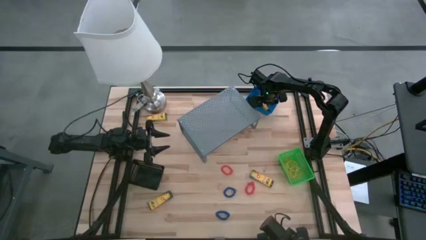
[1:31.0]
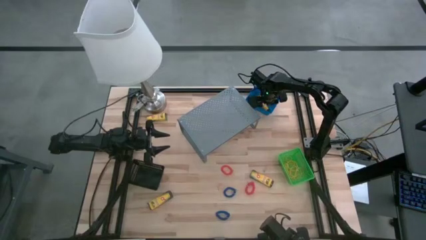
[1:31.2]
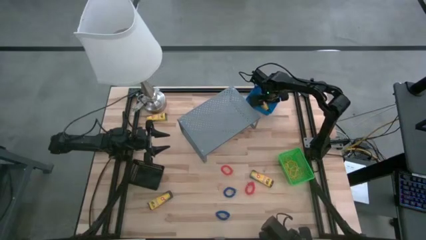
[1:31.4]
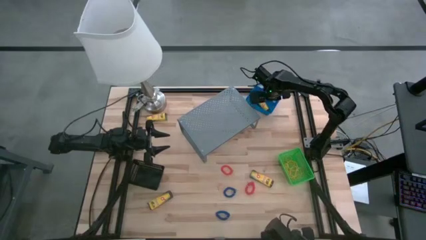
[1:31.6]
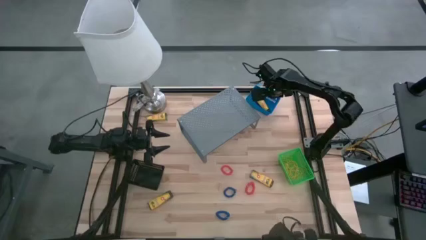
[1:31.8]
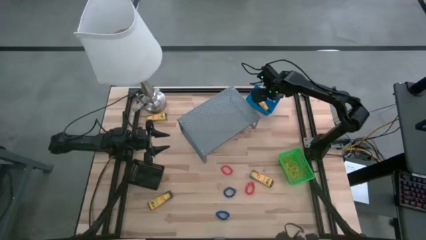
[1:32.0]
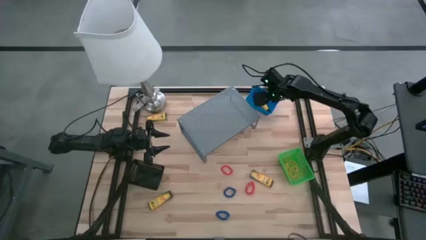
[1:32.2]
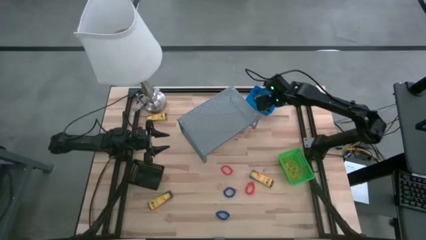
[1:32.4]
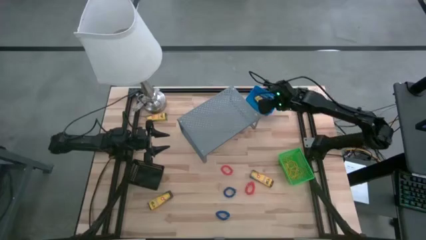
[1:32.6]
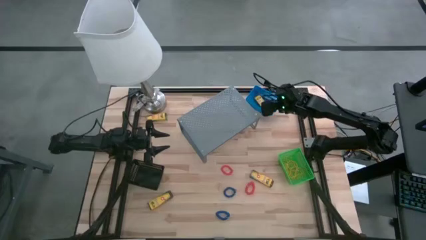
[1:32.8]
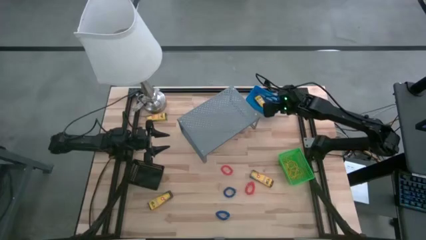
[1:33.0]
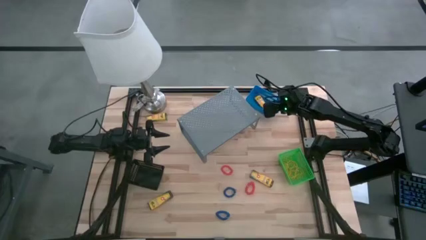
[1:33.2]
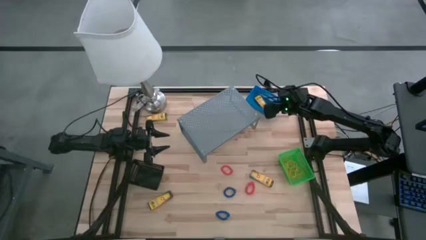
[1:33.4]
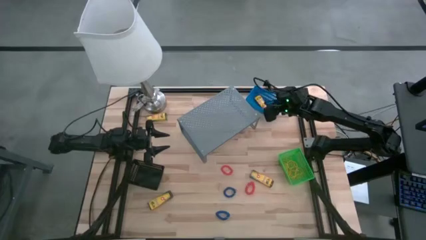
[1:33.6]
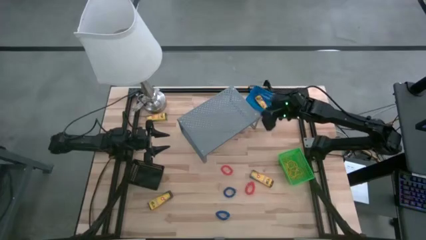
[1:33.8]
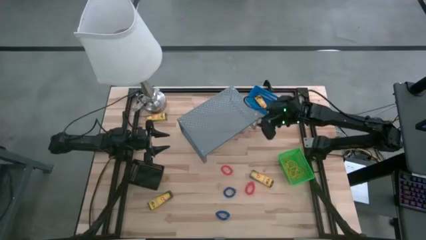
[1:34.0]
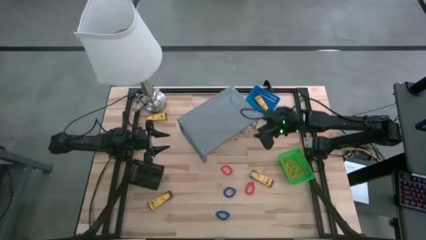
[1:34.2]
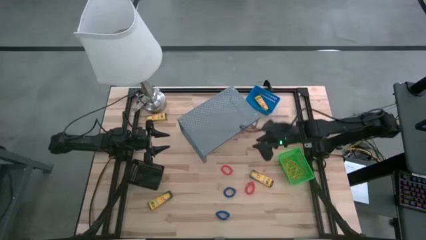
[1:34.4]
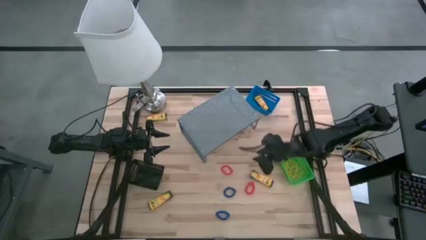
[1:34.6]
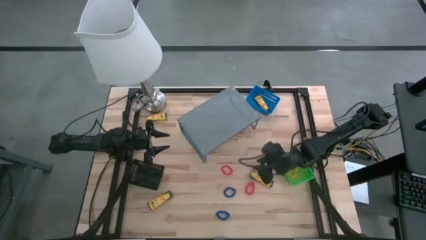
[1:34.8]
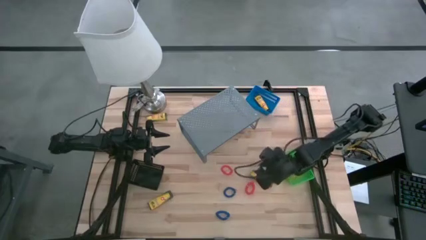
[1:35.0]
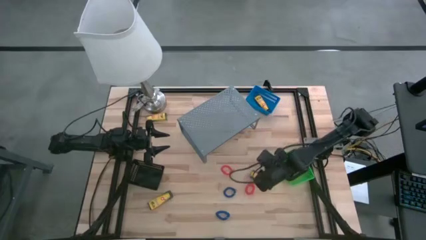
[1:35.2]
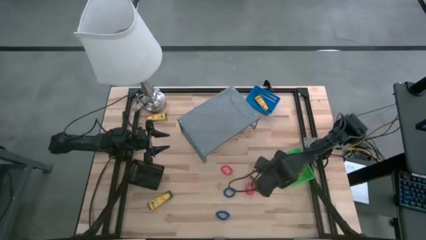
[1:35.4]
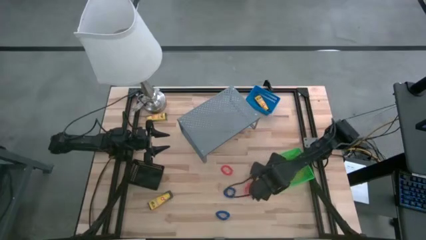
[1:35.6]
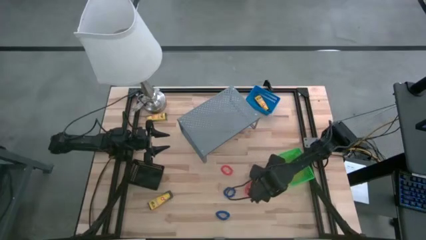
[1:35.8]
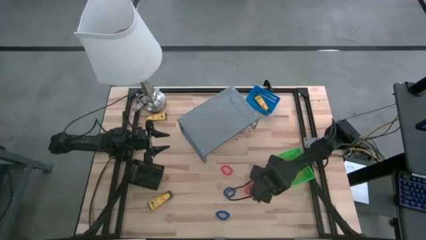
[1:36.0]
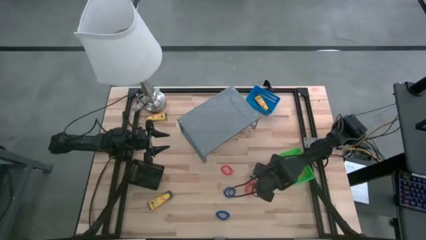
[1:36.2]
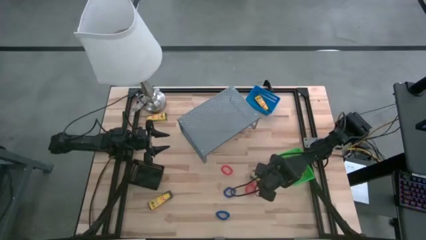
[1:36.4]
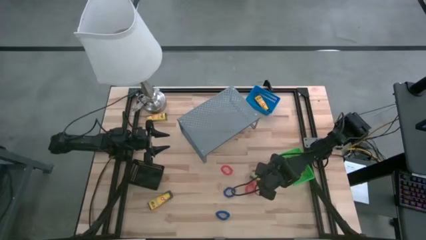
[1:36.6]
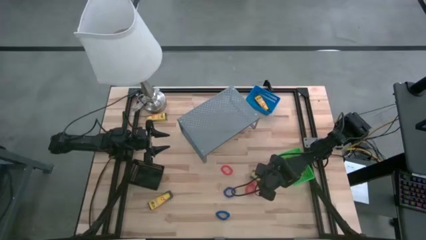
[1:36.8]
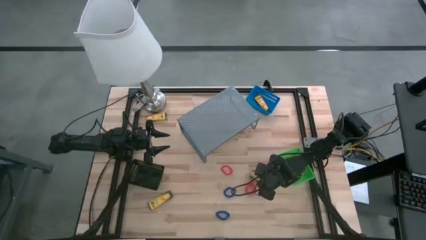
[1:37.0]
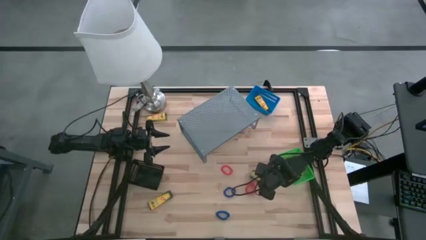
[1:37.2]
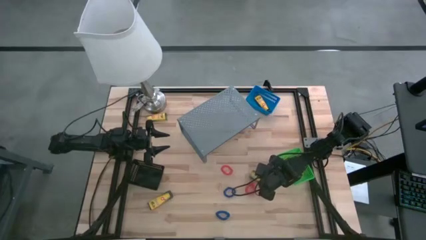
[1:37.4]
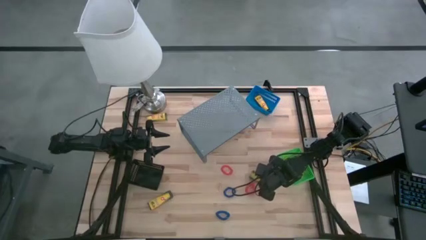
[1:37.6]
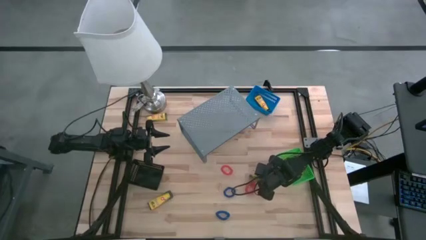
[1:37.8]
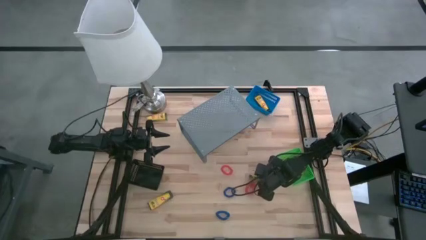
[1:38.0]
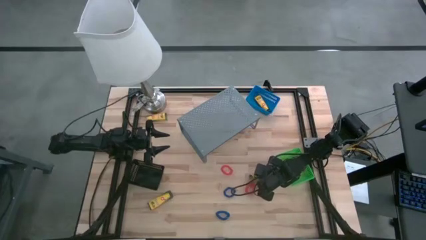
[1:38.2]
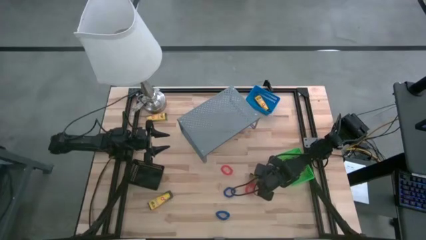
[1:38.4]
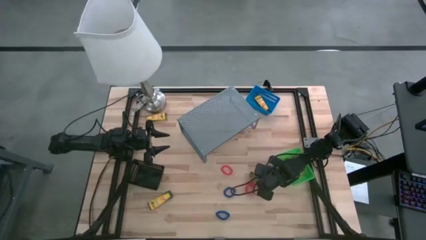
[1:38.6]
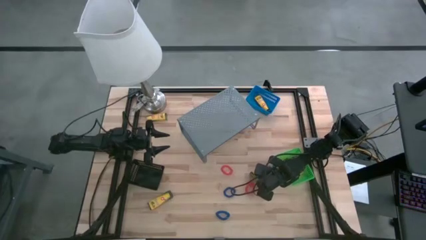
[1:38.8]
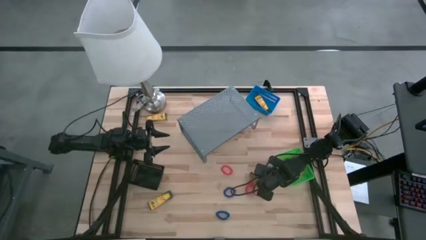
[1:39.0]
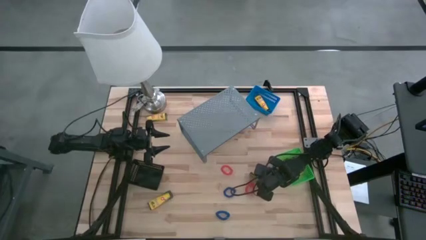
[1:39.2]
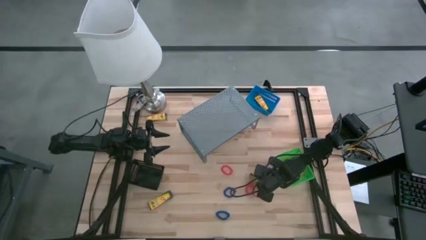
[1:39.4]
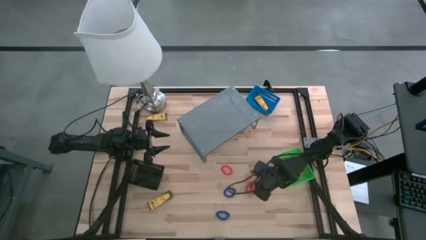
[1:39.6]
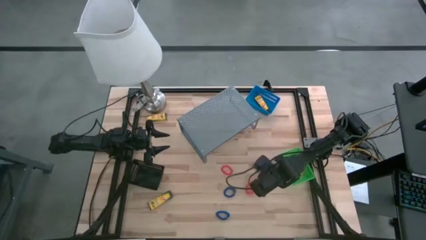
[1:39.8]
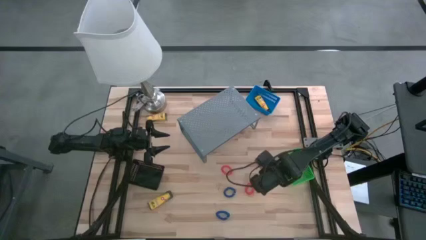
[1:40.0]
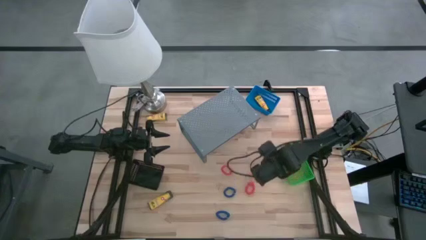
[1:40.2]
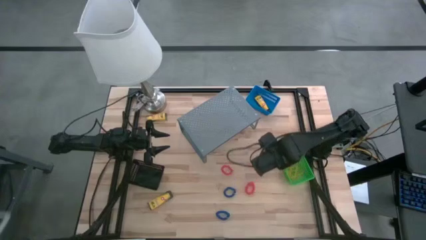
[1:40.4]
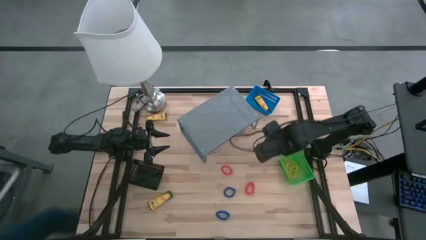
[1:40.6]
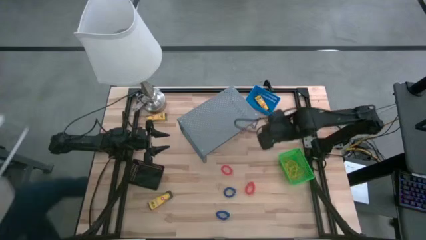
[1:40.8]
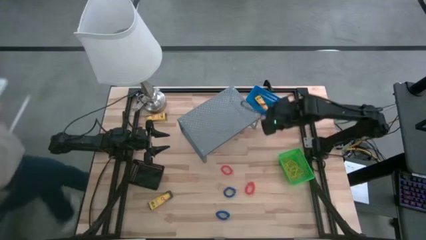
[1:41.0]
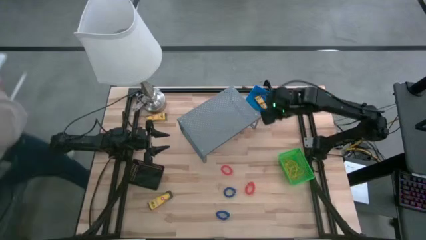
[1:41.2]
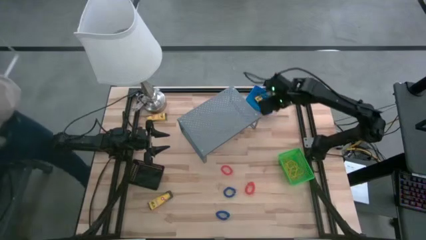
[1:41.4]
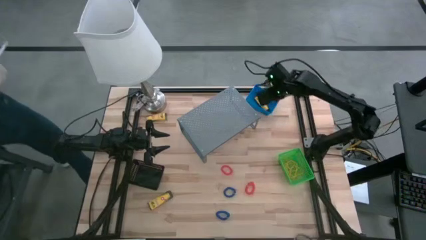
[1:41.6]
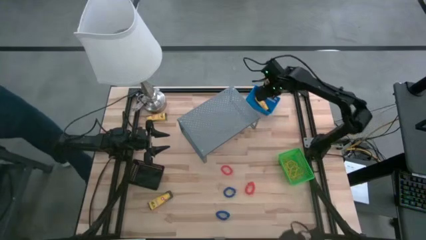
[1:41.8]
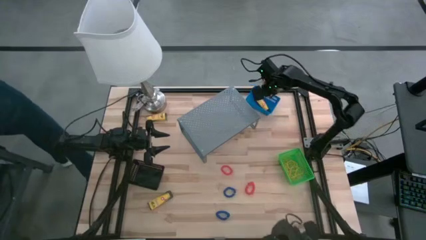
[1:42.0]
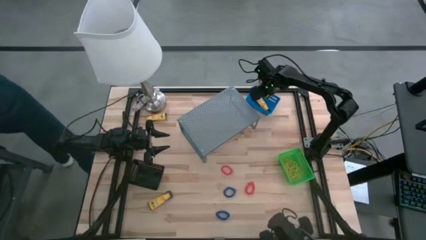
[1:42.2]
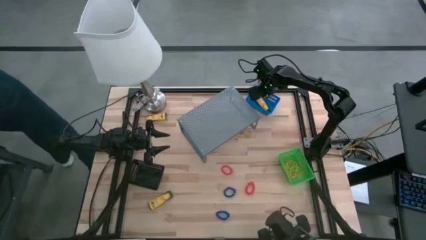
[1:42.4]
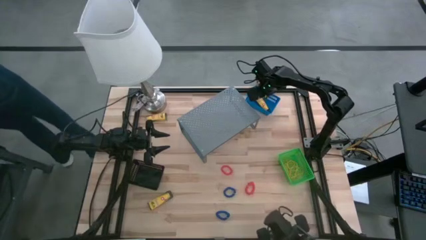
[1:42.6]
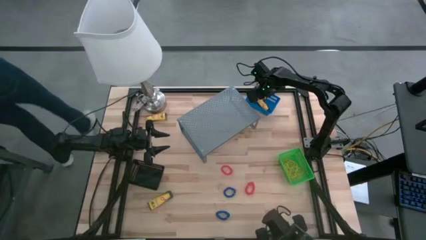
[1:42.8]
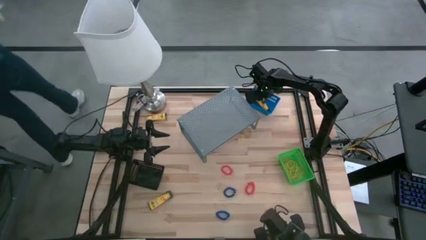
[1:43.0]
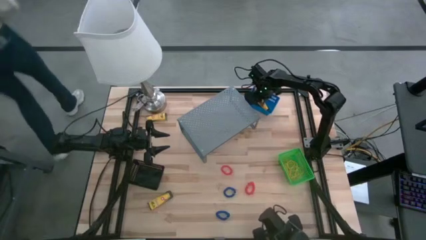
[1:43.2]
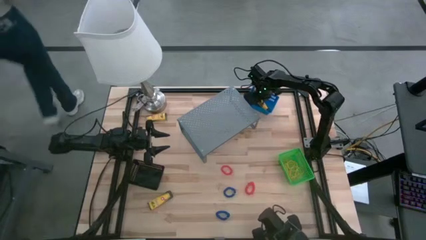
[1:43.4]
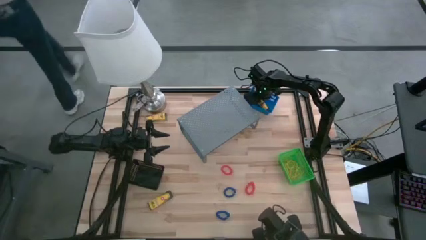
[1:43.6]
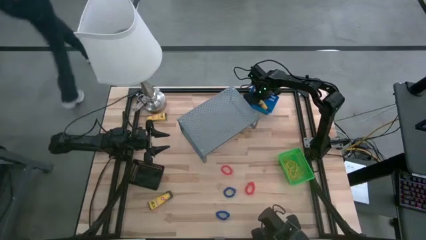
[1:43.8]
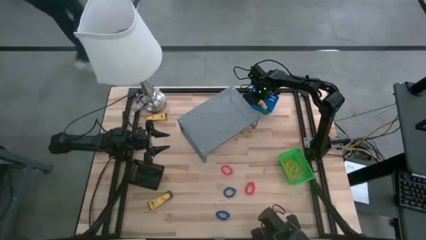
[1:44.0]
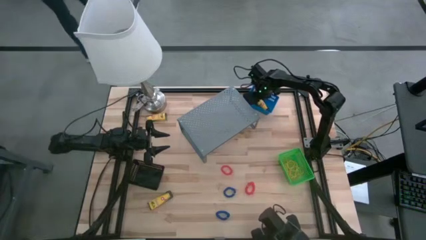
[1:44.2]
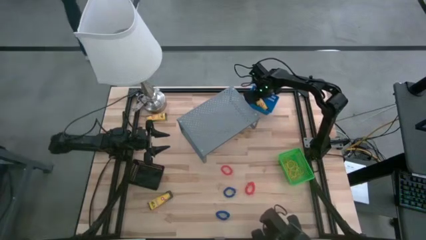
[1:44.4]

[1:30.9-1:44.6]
Task: Pick & Place Office Desk Supplies
Put the crayon box into the blue basket
